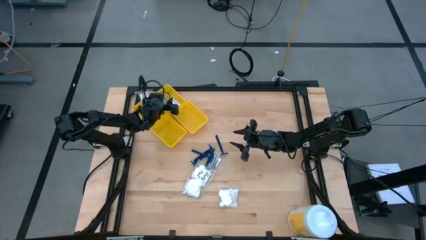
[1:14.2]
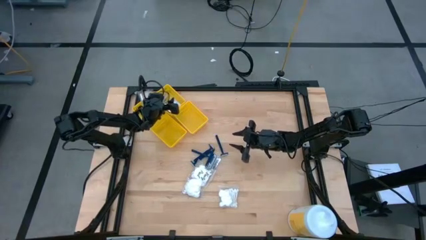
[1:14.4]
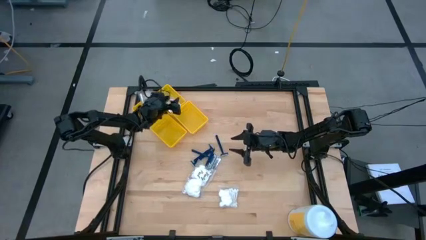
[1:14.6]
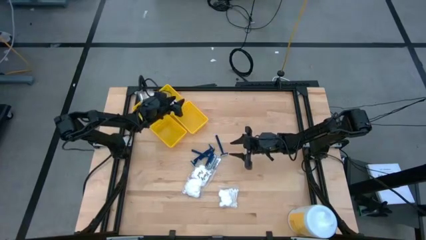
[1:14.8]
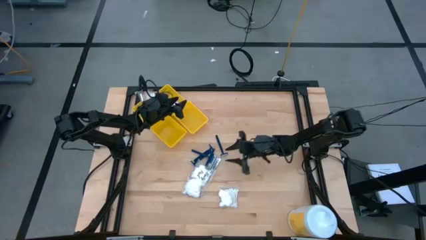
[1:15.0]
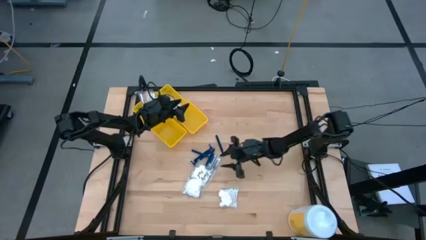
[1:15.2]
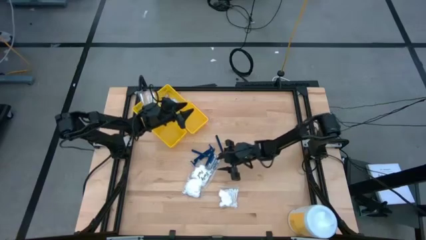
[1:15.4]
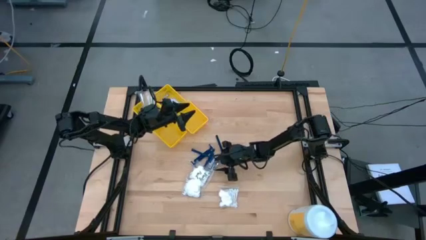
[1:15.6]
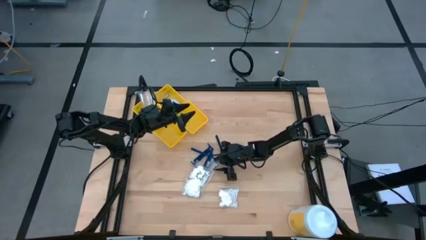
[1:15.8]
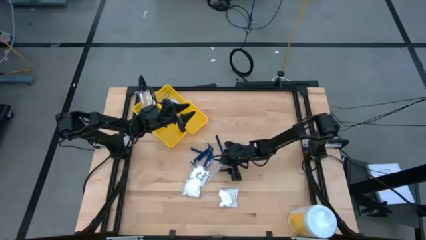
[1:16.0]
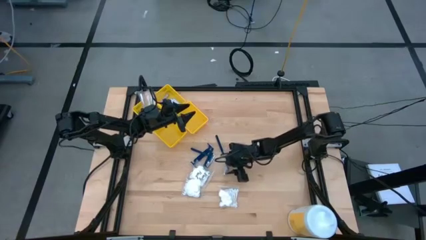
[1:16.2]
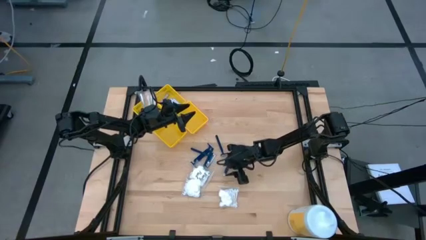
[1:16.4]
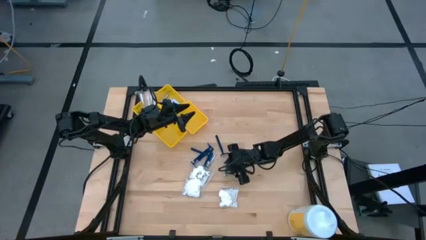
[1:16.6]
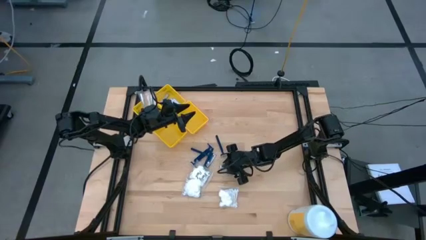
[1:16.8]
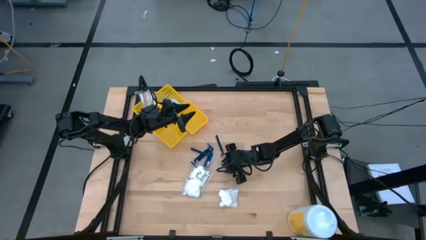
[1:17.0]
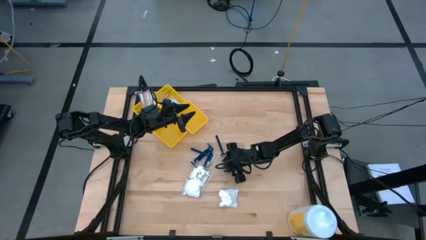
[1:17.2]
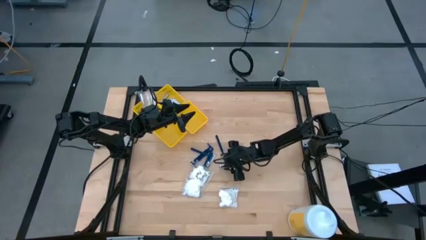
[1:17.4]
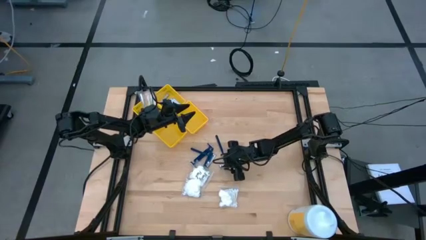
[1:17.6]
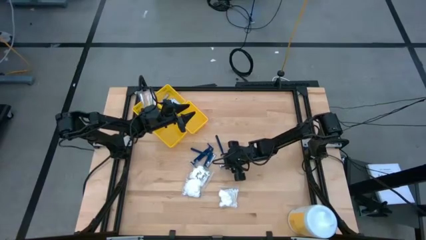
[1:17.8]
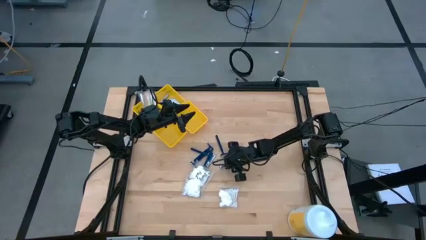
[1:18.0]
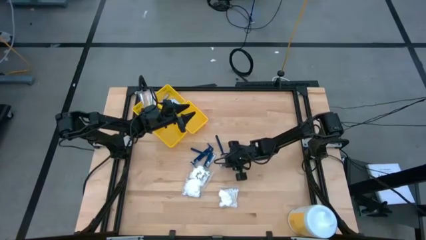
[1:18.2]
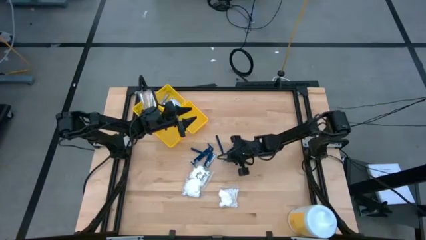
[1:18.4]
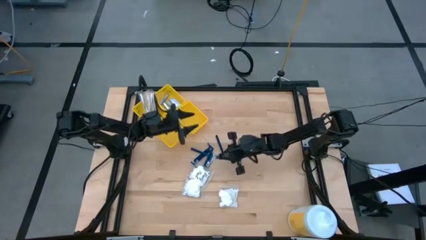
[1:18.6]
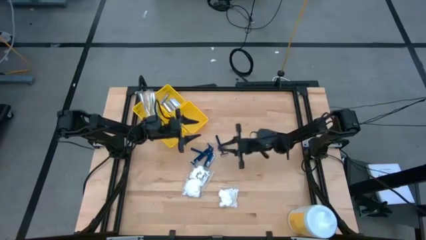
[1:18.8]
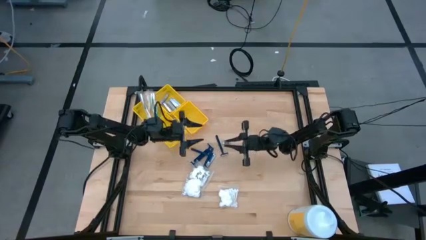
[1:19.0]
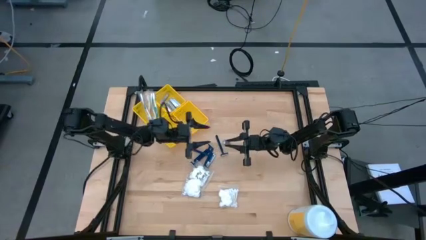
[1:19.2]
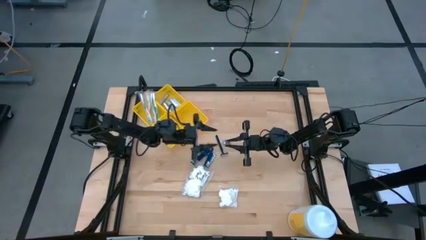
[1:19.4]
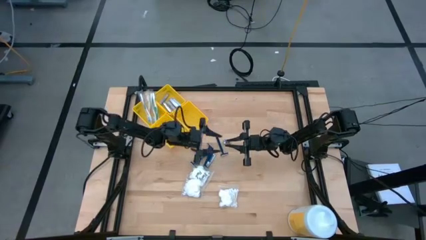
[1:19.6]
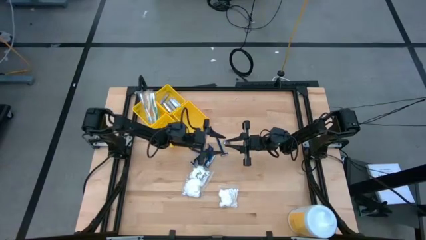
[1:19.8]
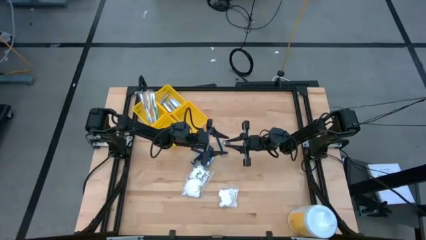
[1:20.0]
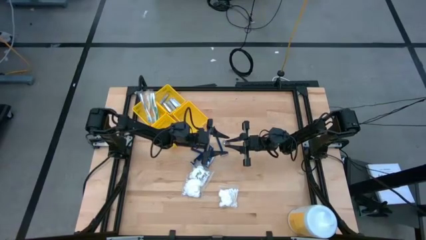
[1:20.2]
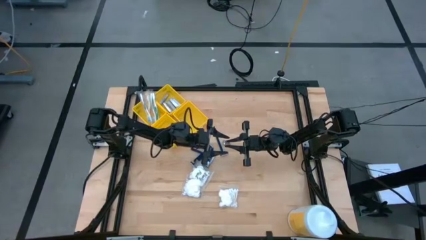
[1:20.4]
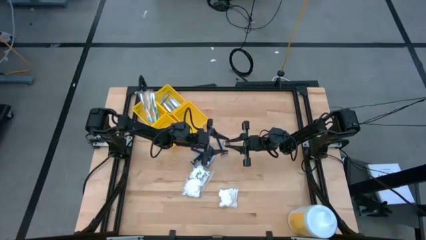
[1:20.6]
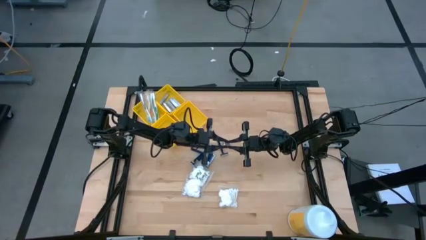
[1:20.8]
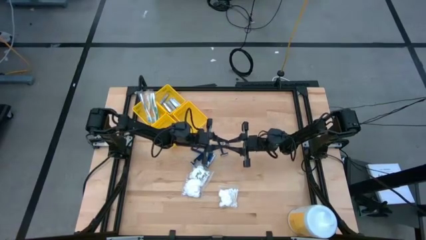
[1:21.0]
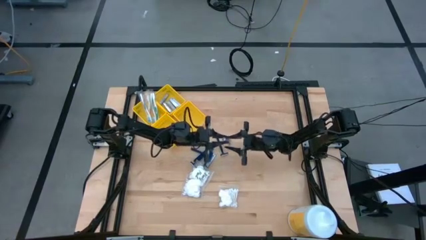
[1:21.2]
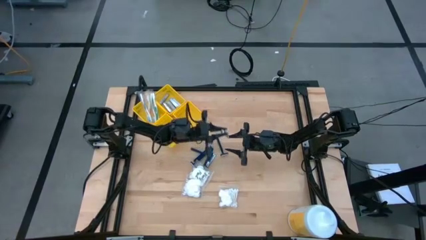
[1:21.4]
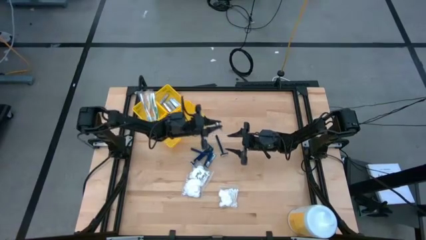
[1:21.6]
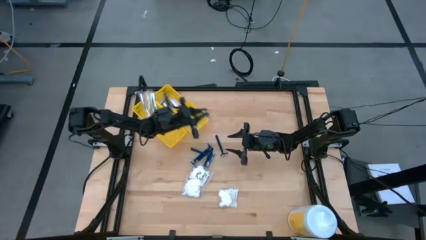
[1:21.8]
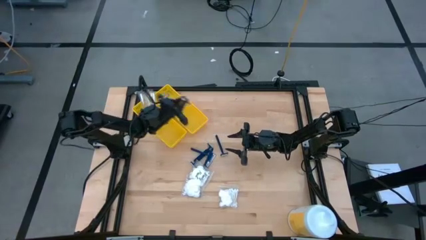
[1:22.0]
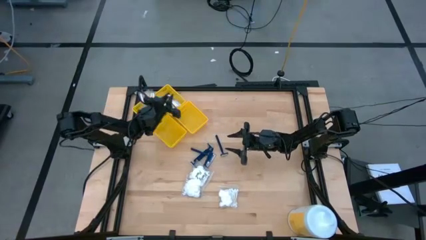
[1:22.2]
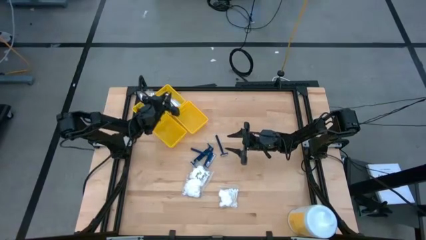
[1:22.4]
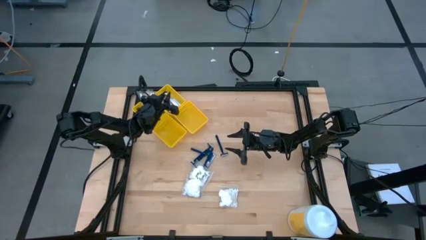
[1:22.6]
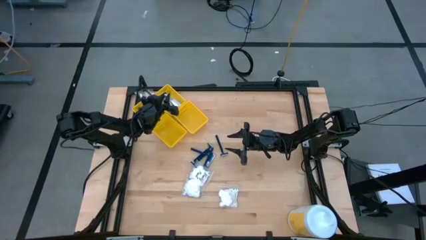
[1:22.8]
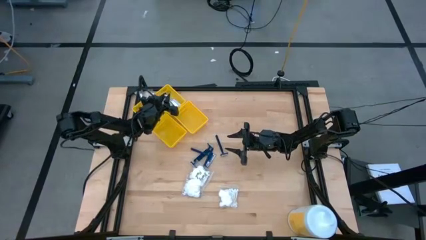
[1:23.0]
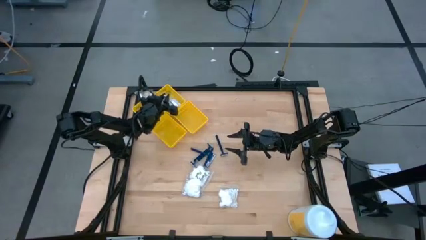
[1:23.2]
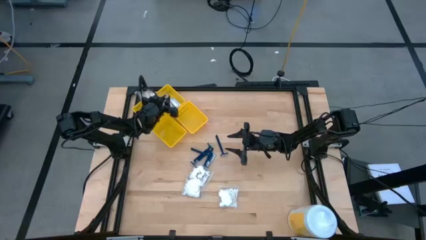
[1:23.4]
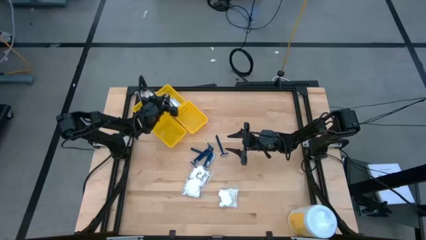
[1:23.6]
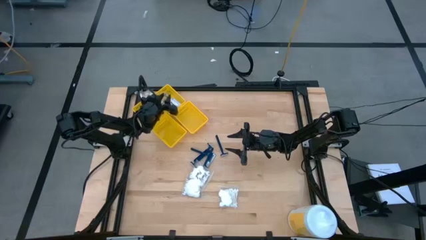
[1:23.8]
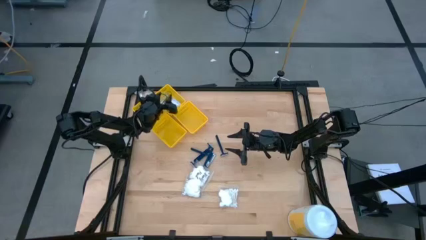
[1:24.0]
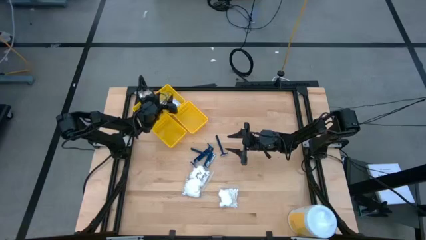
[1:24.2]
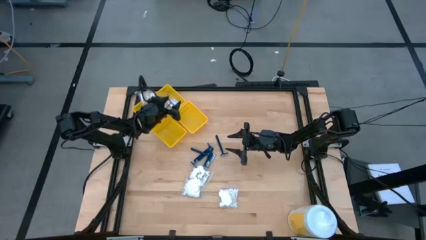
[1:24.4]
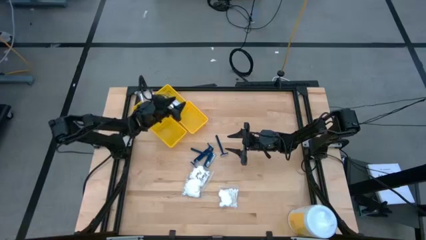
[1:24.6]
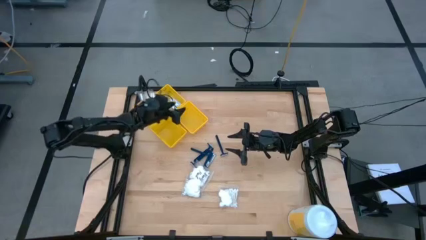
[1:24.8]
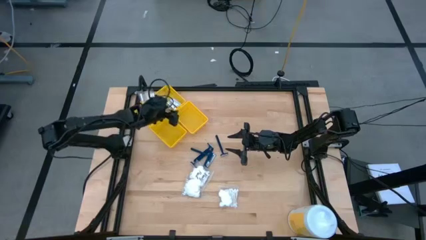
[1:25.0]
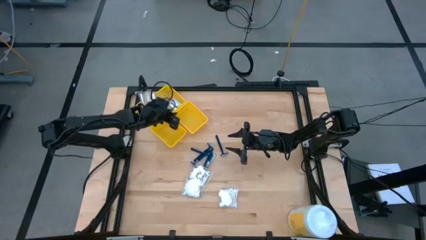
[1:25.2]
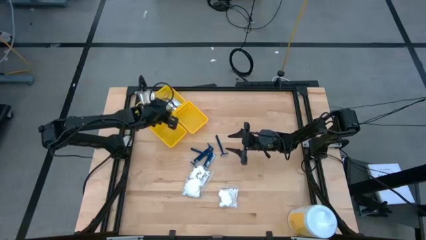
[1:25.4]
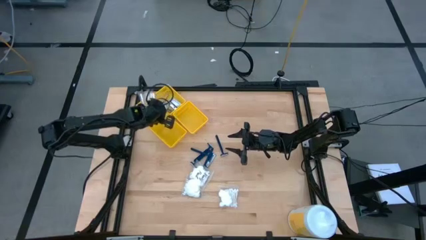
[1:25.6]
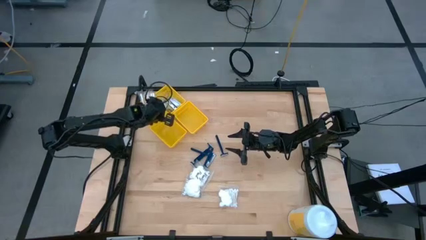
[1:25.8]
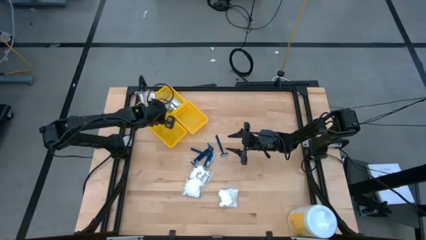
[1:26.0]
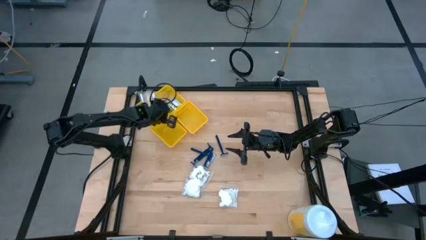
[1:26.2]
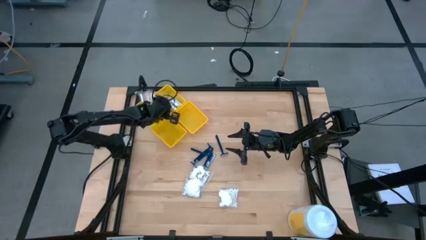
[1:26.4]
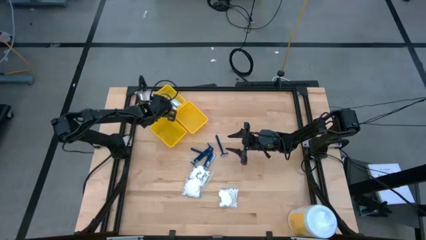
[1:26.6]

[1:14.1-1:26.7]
Task: Pick & Place Travel size toiletries
Put the silver nail cutter into the top yellow bin

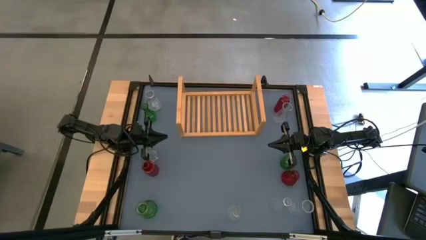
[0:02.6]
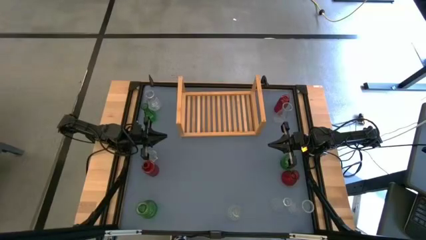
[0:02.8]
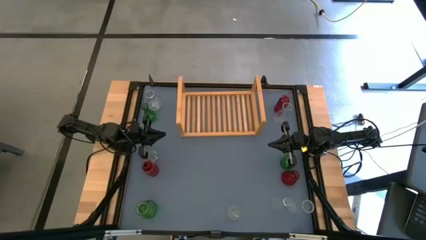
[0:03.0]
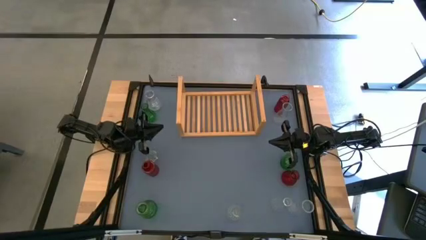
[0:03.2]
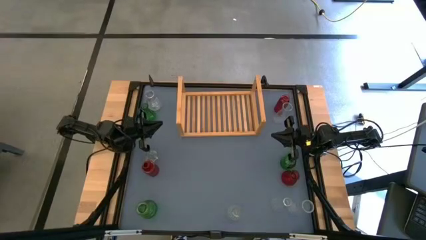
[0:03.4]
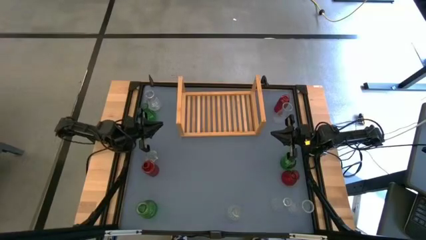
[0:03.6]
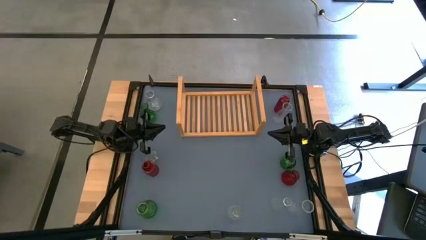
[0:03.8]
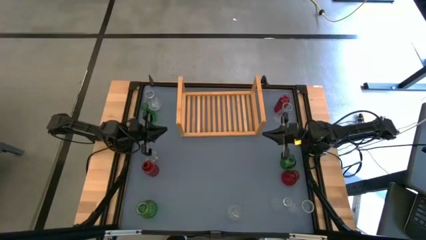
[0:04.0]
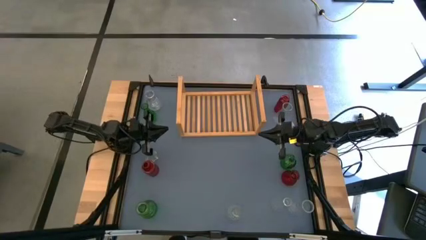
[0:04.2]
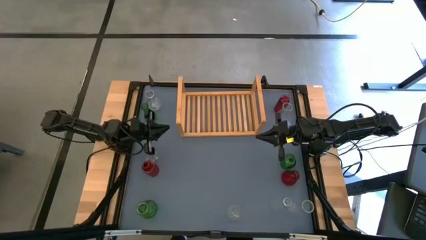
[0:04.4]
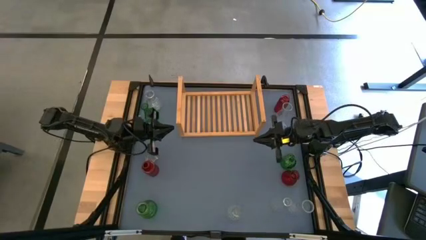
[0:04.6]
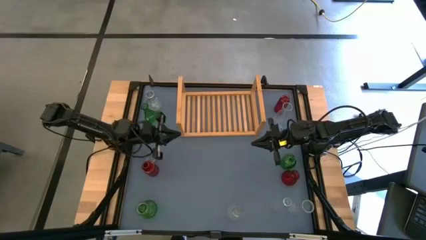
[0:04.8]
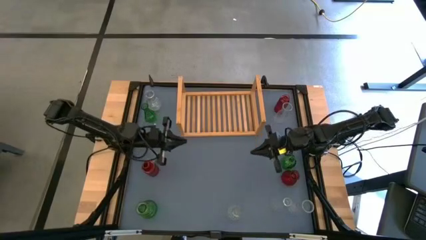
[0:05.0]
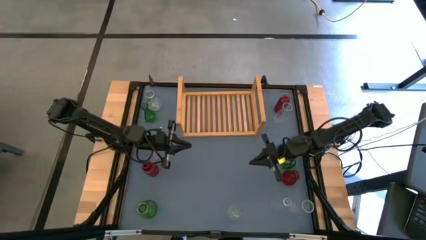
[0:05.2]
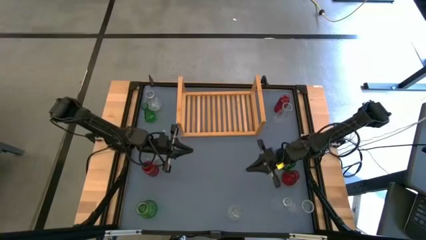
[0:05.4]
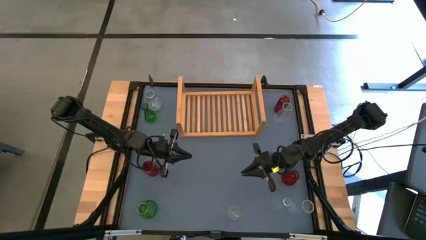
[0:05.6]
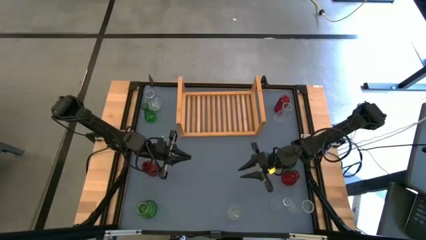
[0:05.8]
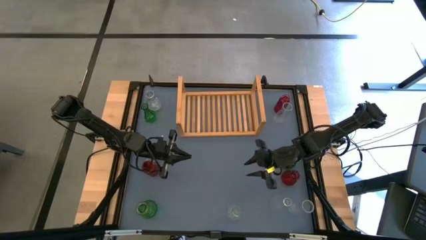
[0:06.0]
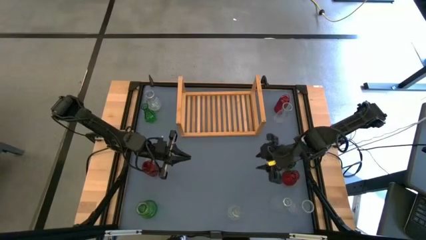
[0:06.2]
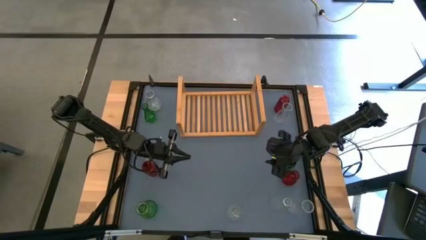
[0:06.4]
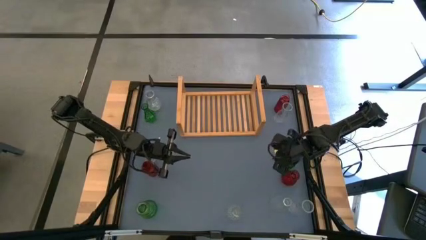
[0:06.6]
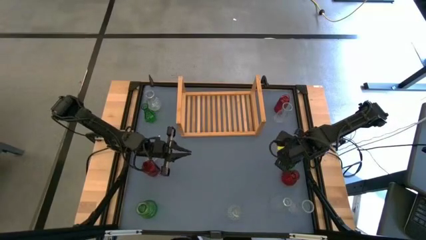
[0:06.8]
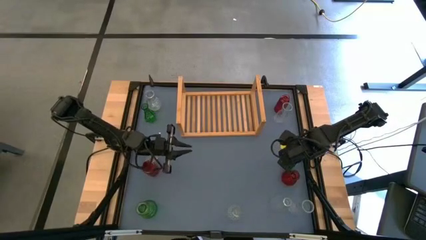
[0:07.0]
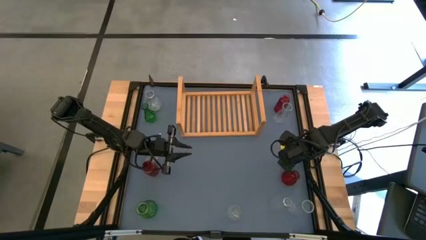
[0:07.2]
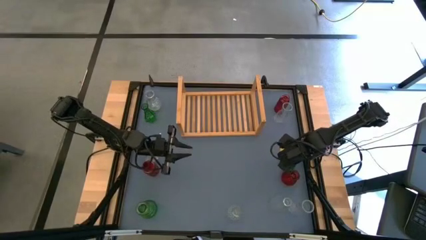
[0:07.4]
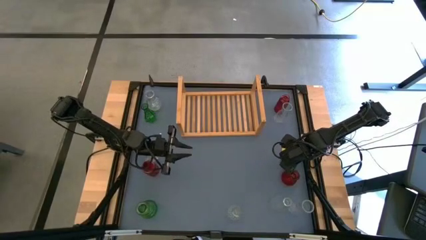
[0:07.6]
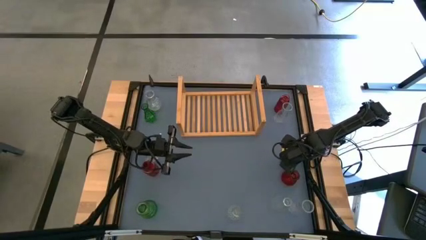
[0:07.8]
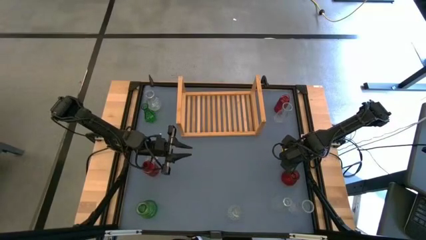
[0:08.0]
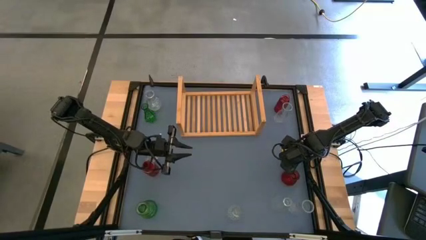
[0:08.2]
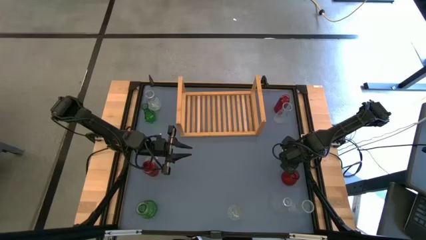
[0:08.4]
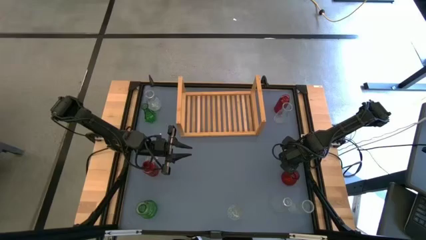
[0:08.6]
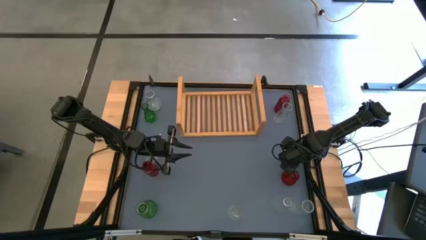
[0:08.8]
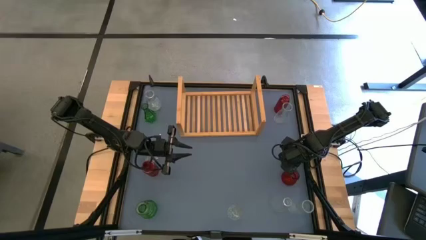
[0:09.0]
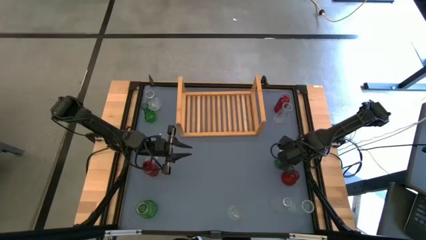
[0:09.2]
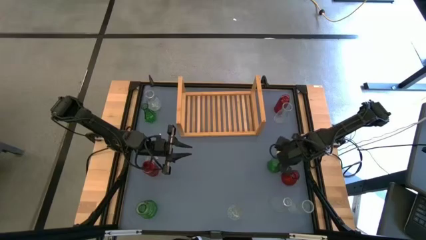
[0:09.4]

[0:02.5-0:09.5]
Task: sort vases onto shelf
Put the green vase on the shelf
